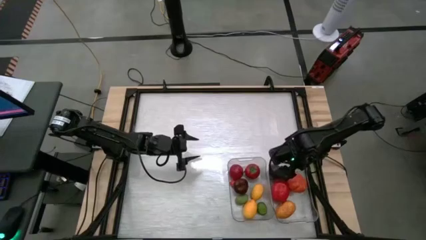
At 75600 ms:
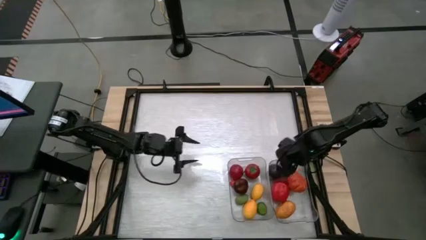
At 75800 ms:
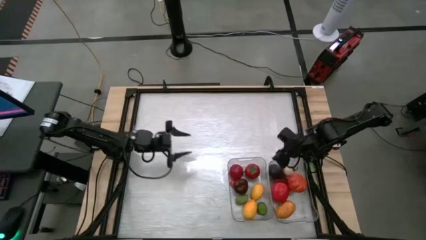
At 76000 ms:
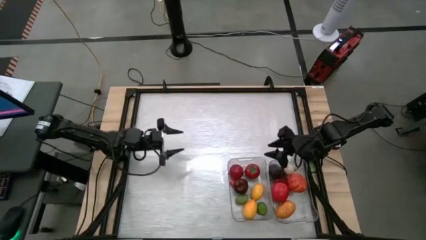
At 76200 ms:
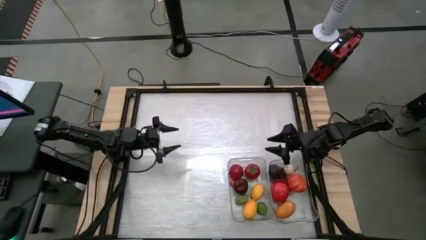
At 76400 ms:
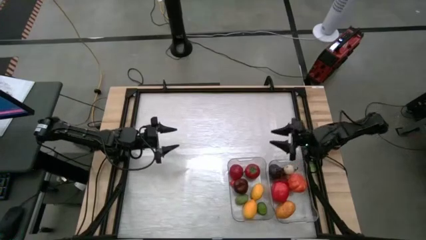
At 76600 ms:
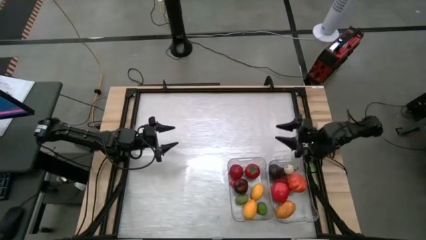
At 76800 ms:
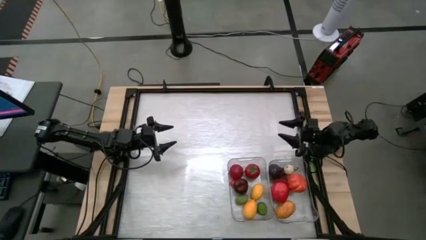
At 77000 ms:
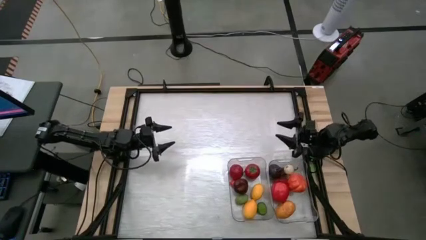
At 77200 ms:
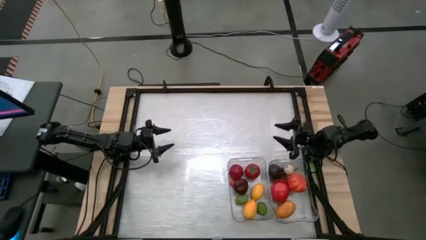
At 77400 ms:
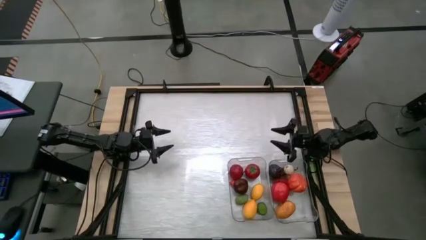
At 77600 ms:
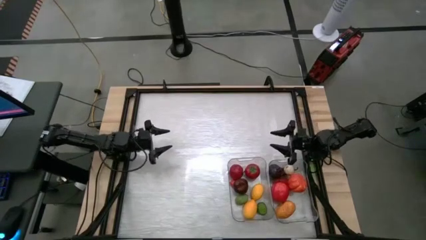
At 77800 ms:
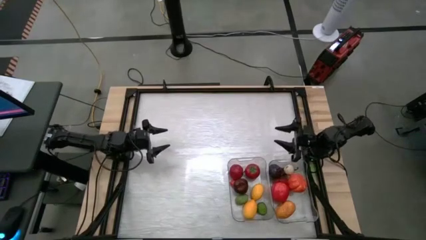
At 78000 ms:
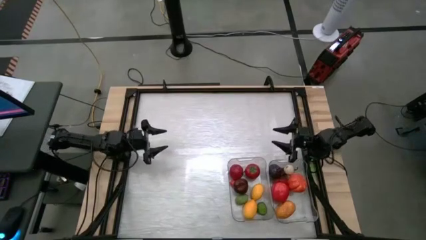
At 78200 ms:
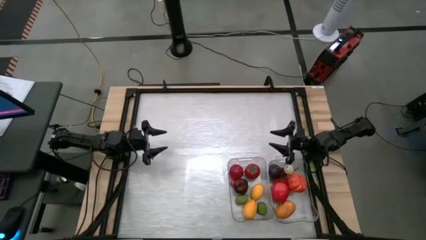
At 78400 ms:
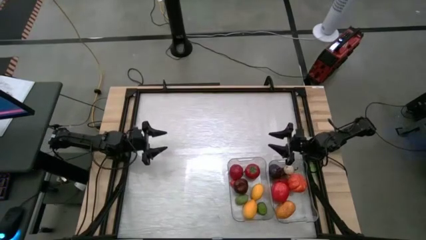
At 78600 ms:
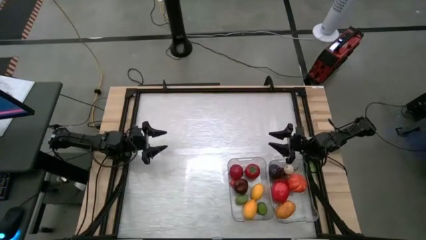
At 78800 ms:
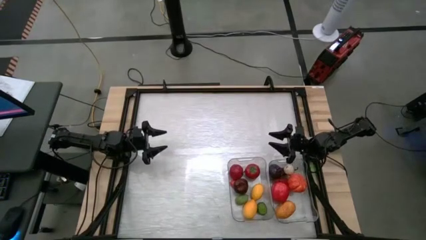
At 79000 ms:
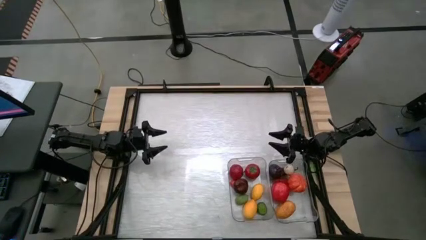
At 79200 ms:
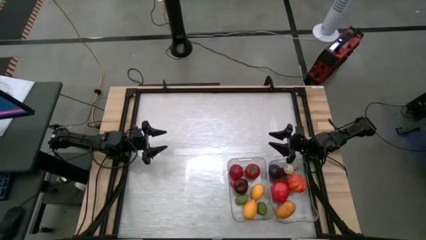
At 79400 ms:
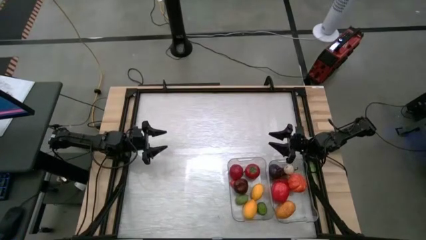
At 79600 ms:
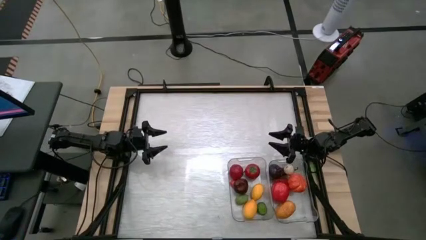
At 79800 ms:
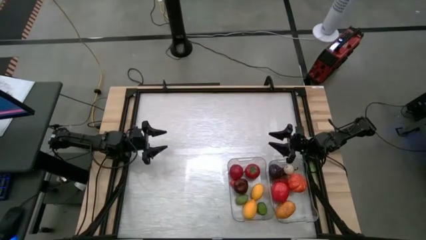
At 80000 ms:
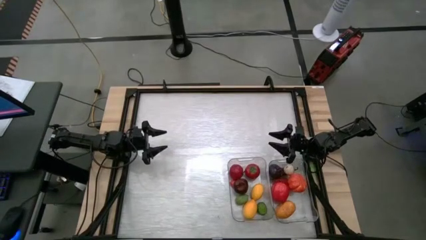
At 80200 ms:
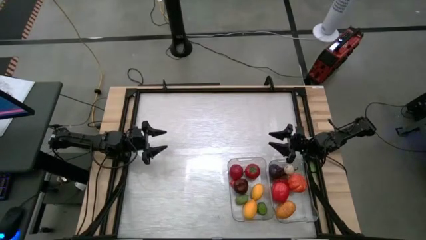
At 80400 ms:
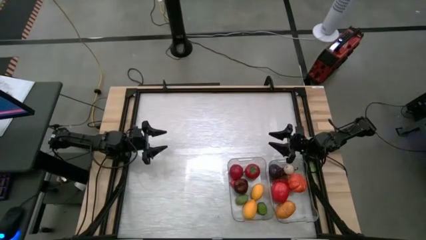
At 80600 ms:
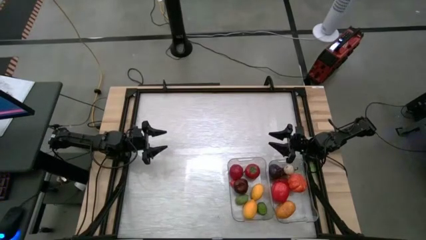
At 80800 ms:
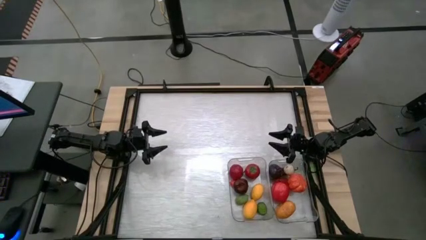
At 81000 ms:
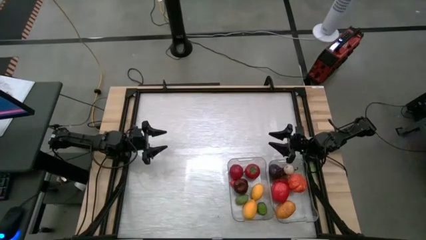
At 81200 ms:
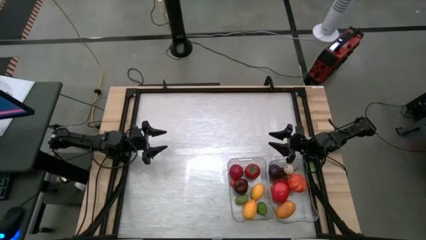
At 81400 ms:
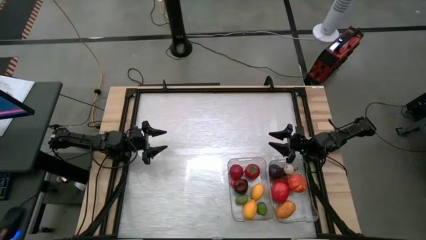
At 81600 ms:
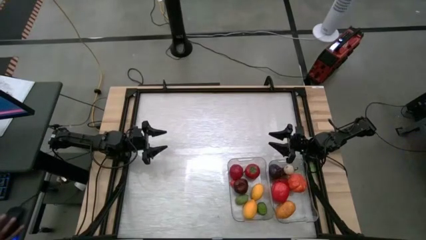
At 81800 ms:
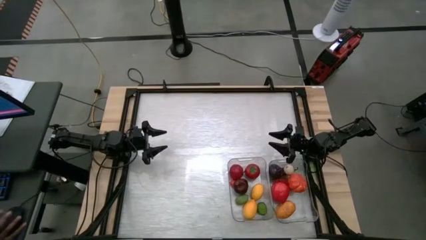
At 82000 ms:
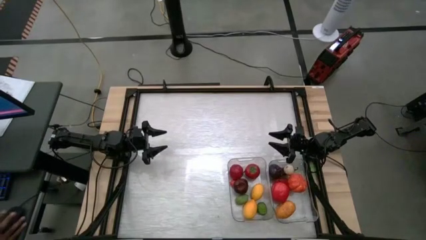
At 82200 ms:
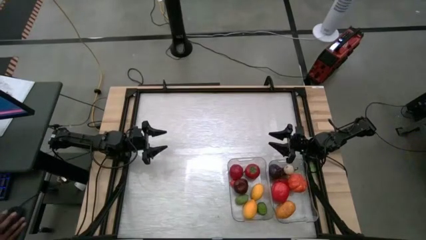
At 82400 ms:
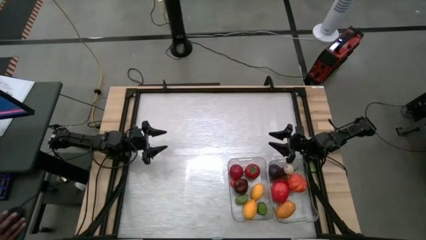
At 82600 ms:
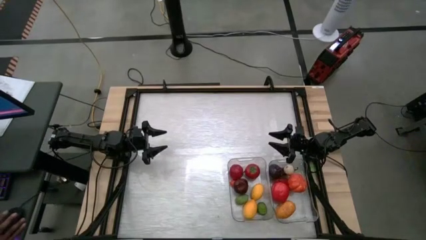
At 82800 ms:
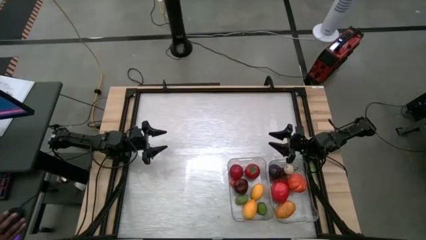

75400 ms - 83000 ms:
Task: Sort produce into baskets
Return to Home Position

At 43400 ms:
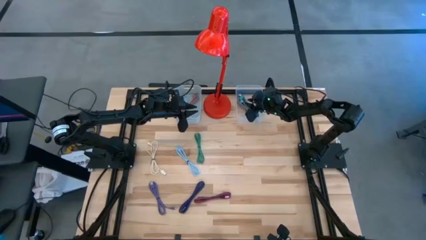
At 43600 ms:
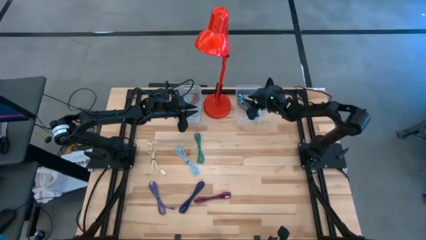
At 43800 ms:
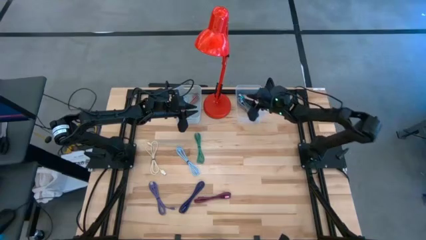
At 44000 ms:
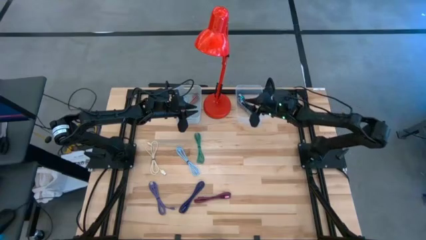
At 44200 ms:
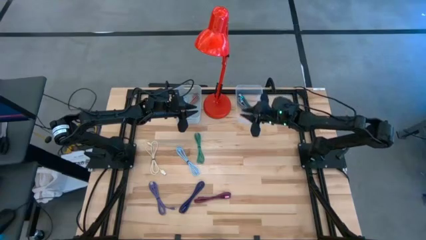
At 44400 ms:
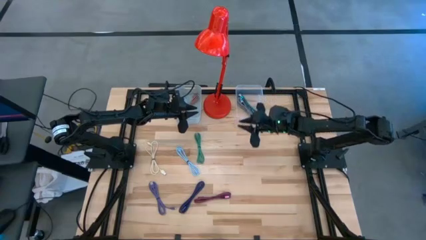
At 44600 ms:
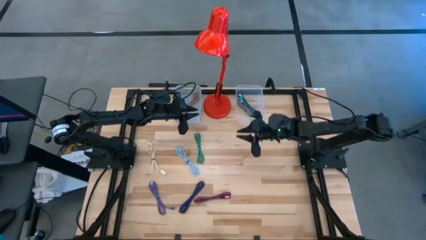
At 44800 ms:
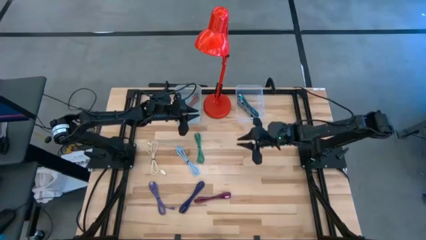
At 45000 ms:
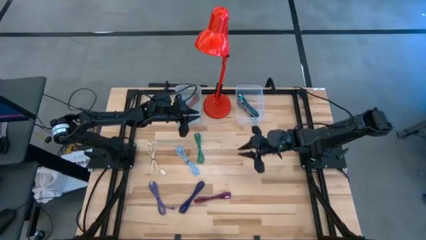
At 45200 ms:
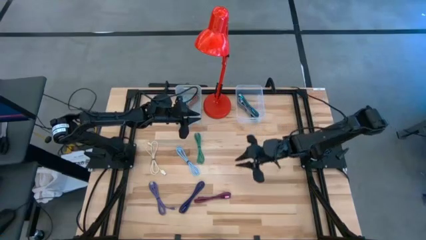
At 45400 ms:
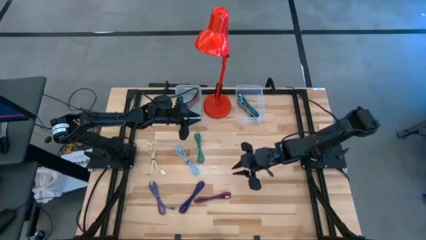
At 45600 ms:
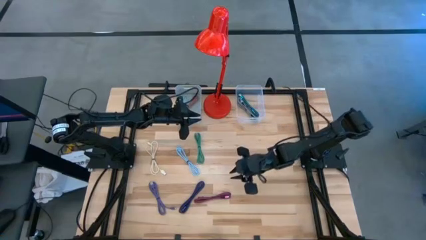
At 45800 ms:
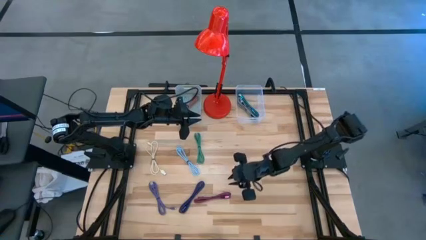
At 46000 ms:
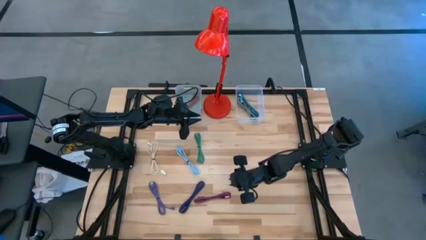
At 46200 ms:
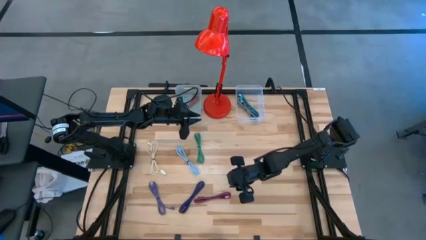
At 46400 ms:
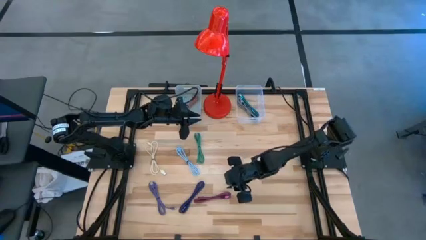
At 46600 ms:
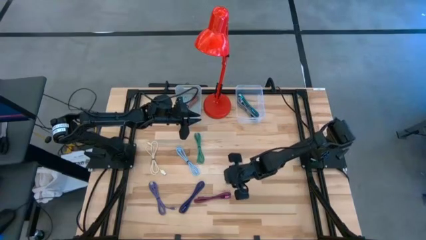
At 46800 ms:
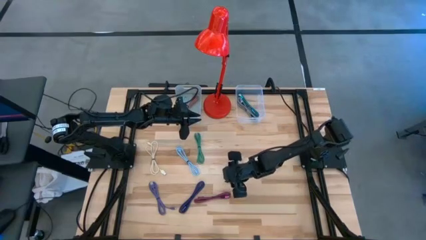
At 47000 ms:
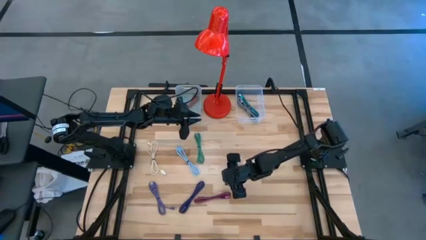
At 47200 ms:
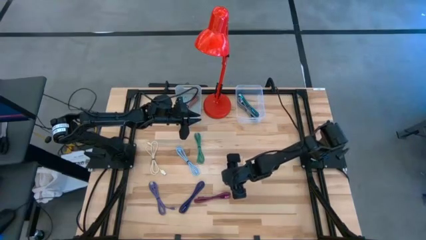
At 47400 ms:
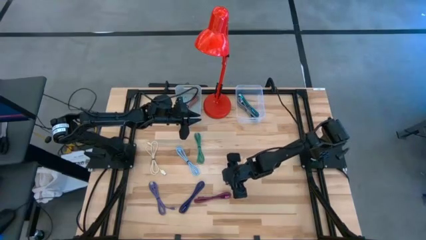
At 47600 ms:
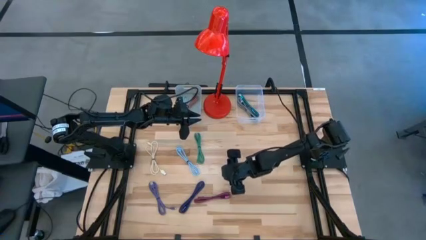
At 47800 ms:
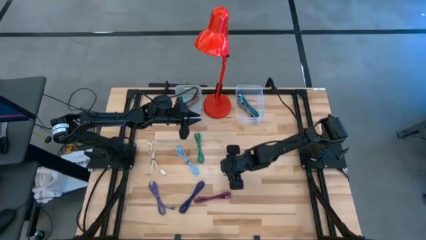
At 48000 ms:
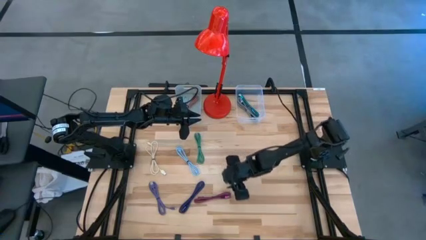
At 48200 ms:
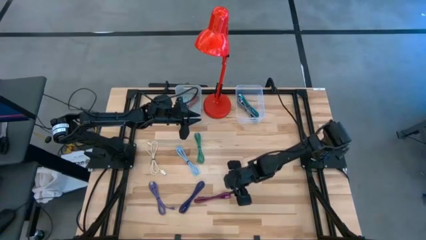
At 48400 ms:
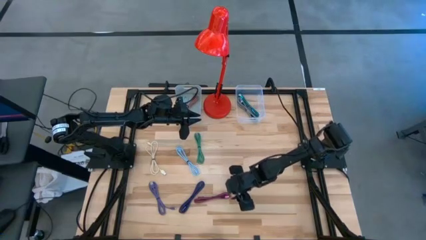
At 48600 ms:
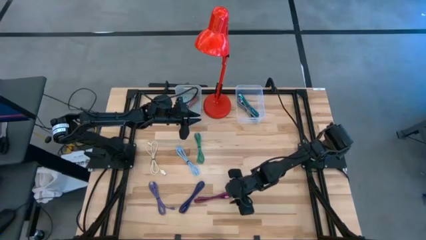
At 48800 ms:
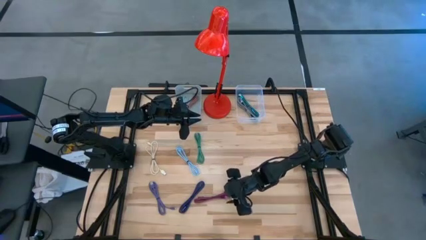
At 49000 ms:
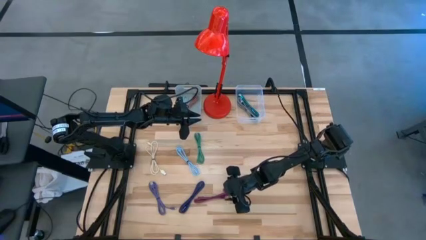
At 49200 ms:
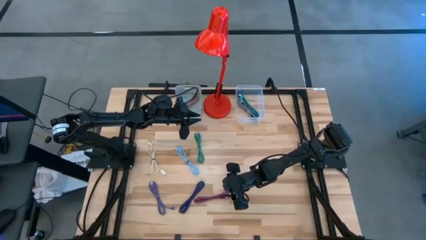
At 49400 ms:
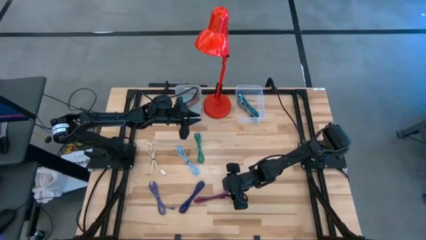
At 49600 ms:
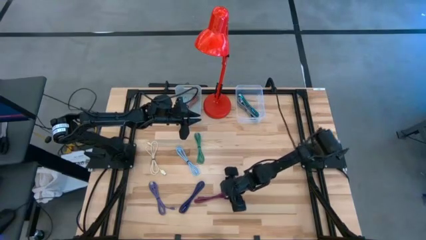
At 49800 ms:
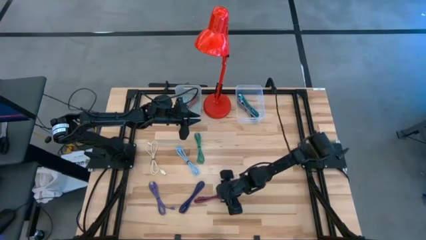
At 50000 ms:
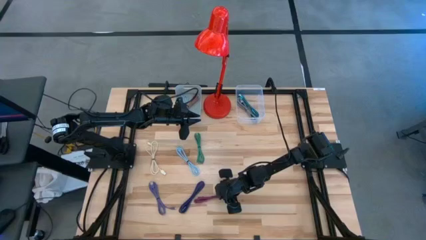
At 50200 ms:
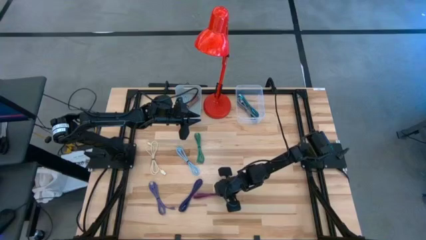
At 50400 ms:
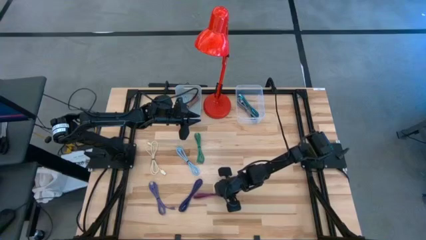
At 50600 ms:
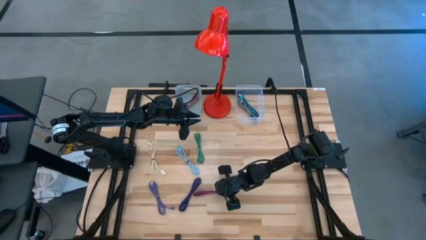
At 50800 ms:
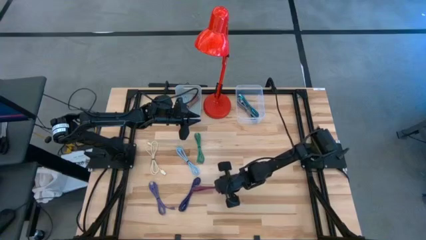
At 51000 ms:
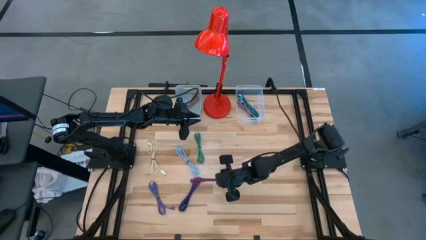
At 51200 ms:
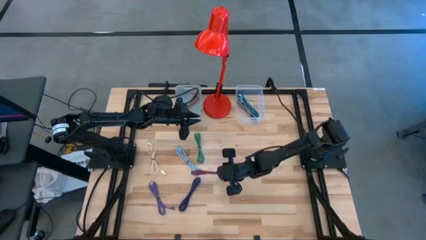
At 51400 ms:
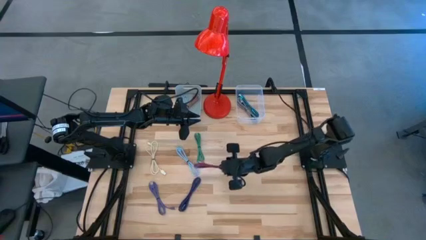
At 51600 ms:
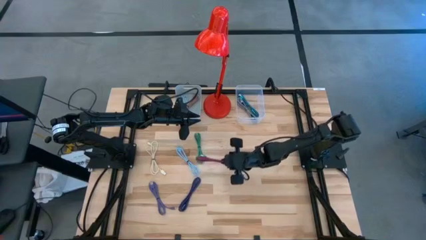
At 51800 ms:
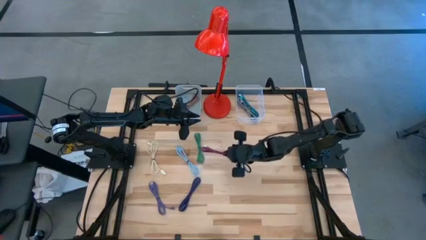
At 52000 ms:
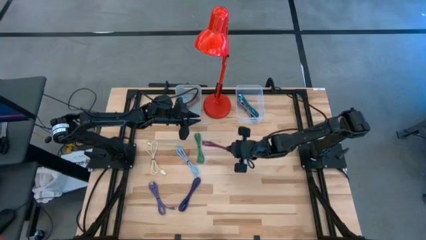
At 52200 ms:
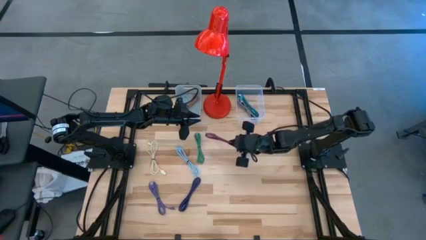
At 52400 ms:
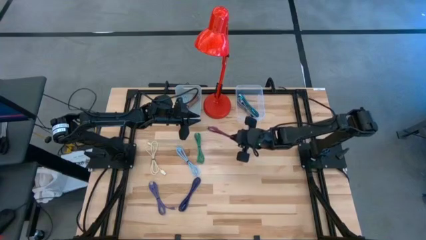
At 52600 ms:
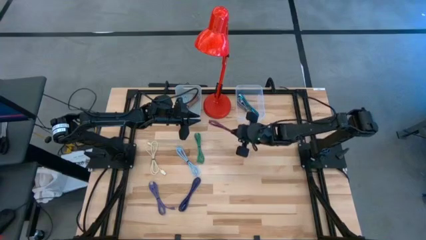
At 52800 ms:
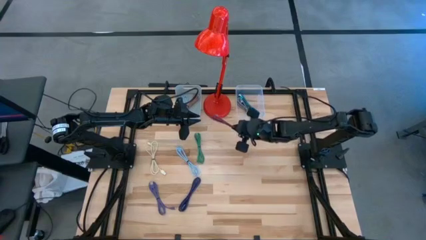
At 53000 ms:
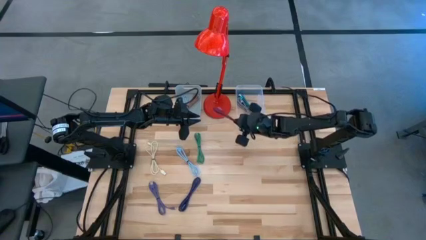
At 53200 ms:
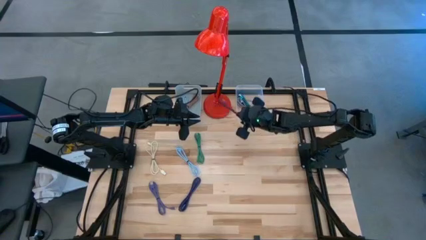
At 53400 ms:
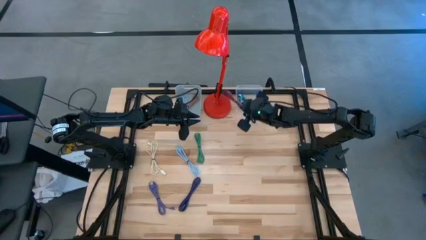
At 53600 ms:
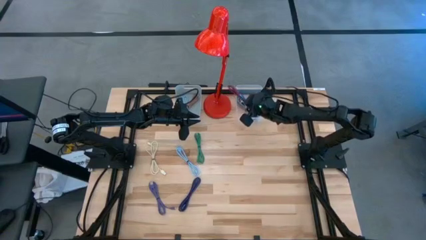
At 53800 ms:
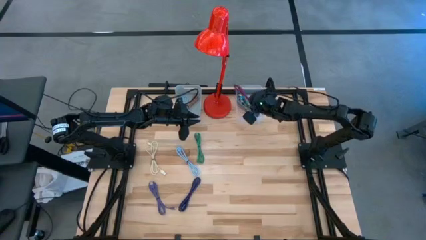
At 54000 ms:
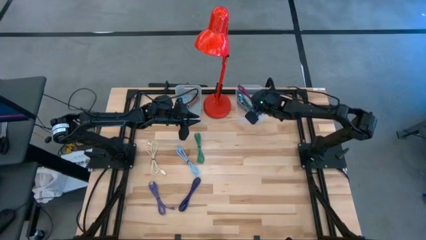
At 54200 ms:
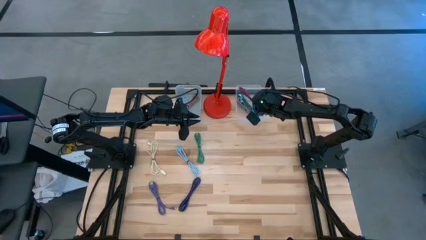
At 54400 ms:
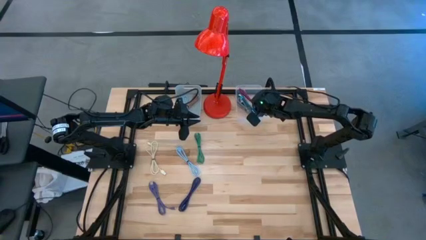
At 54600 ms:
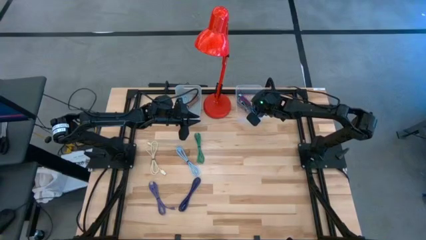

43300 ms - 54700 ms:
Task: Pick & Place USB Port
Put the black and pink charger cable into the transparent bin
